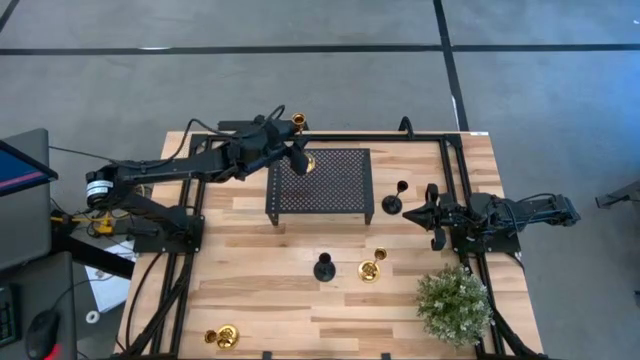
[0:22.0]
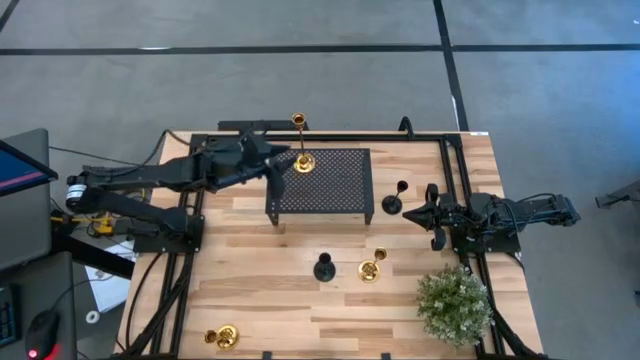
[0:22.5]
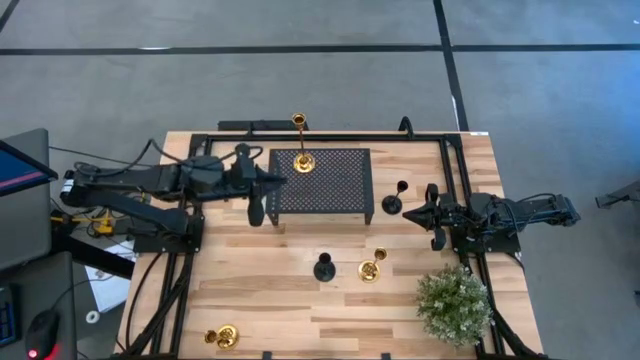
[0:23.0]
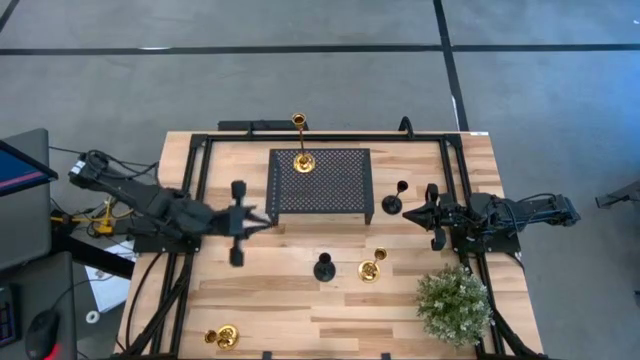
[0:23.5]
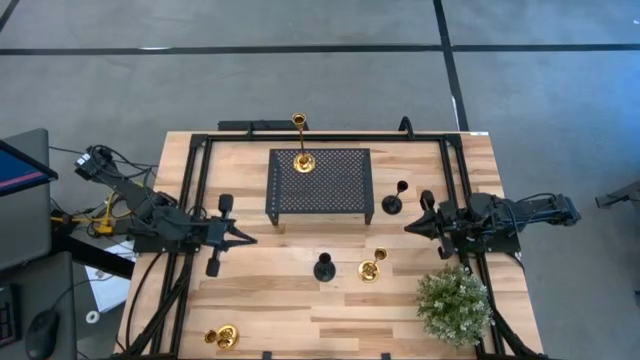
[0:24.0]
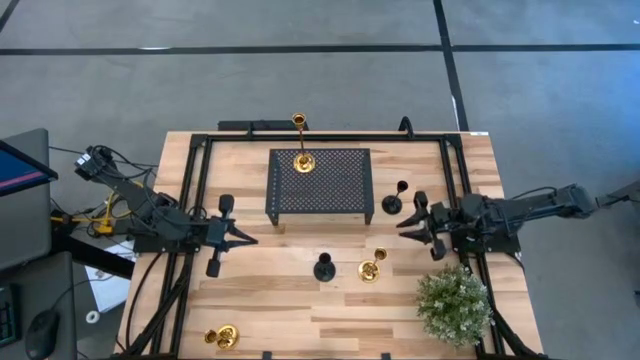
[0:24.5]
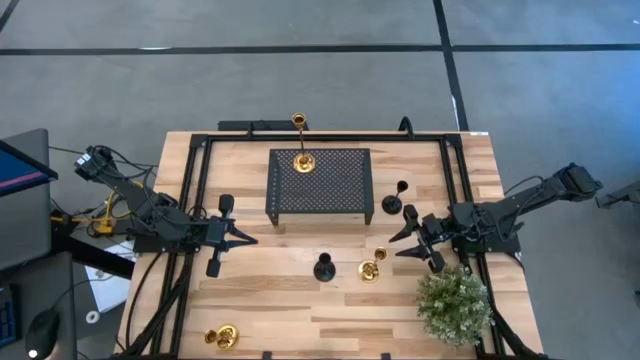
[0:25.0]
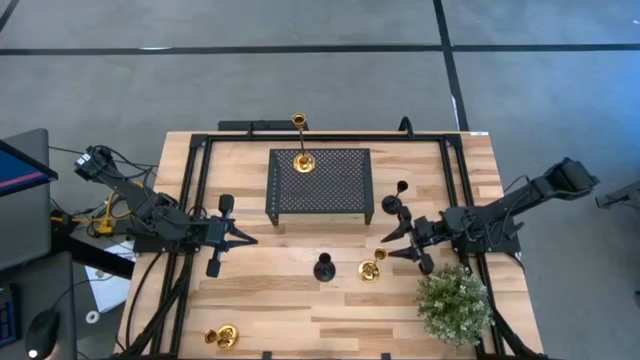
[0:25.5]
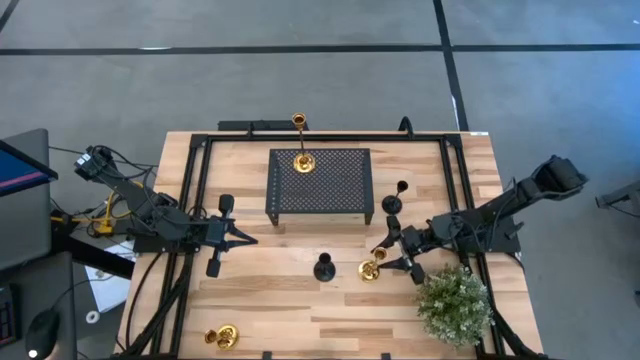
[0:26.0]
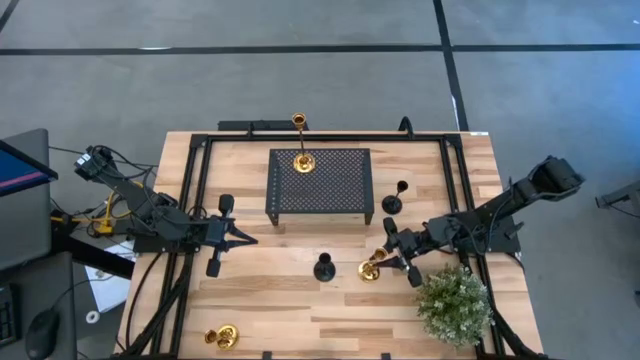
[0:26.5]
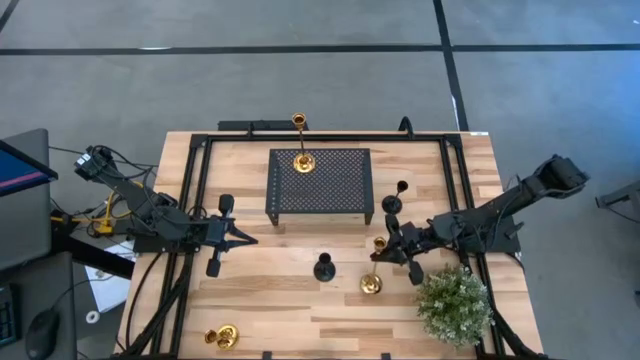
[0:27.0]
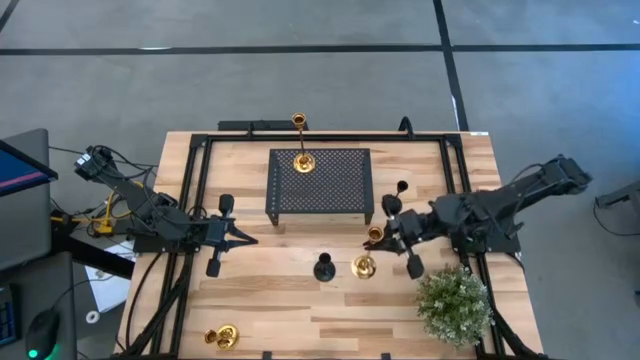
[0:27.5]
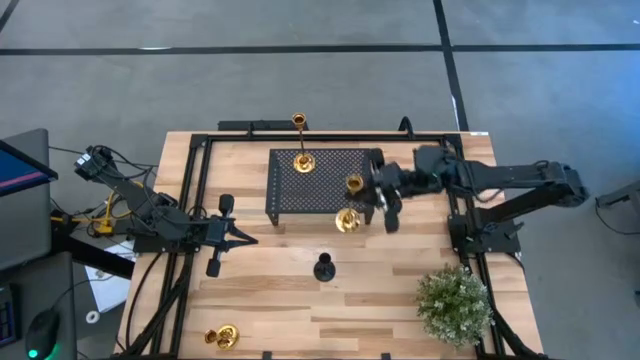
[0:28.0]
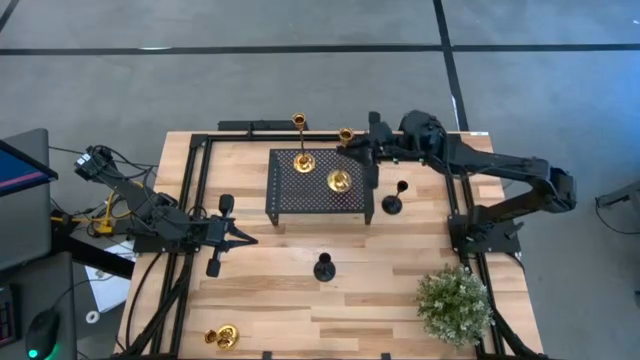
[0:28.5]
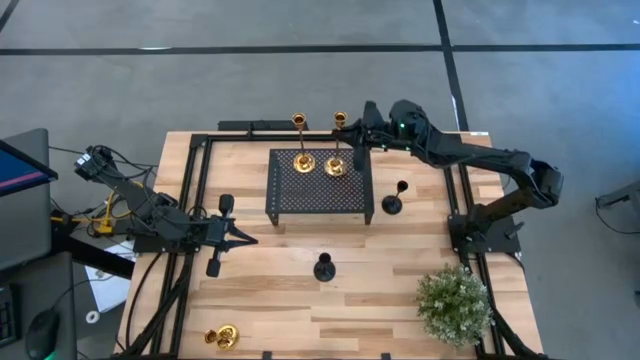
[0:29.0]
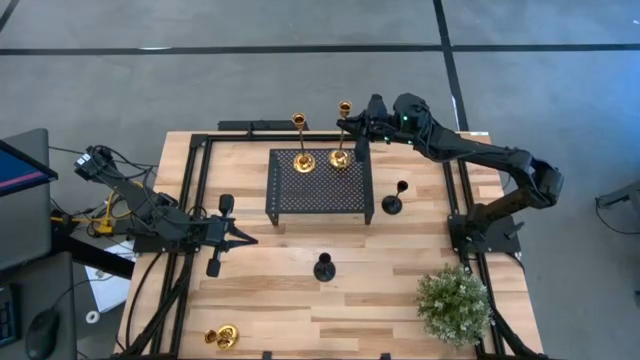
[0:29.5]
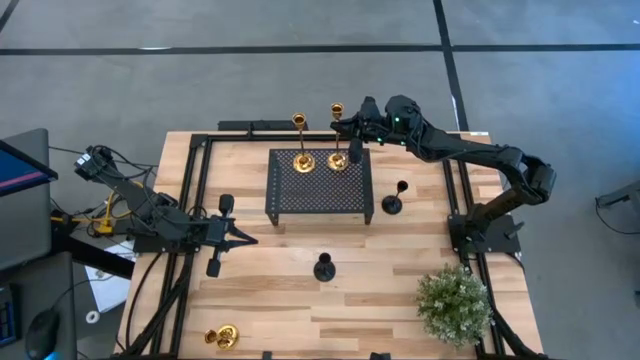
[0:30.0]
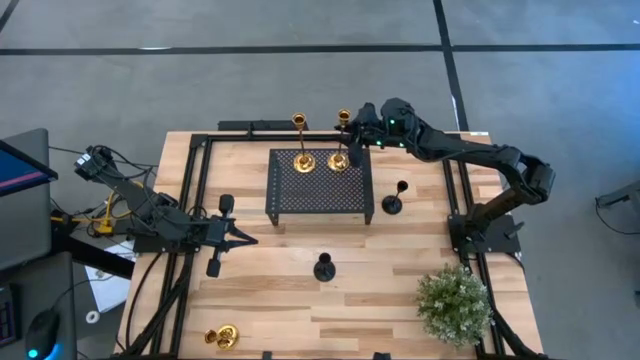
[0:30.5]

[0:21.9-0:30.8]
Task: Pick & Place candle stick holders
Put the top metal candle holder on the shelf

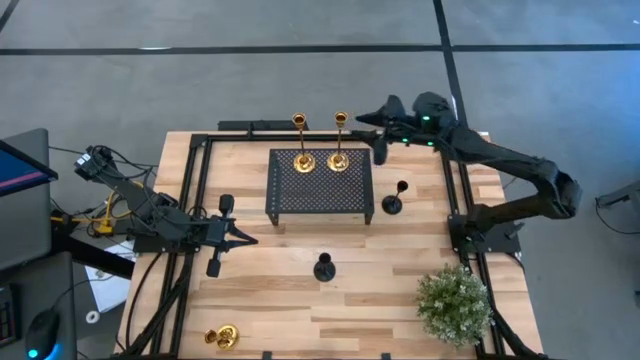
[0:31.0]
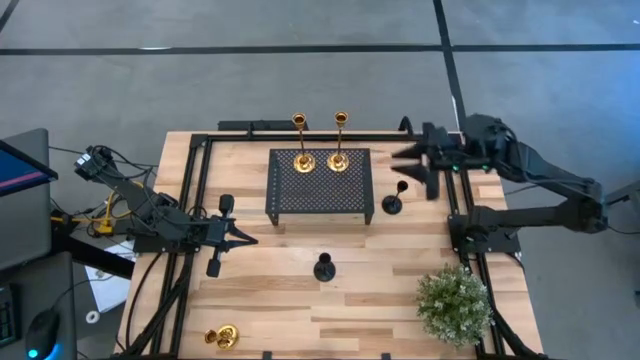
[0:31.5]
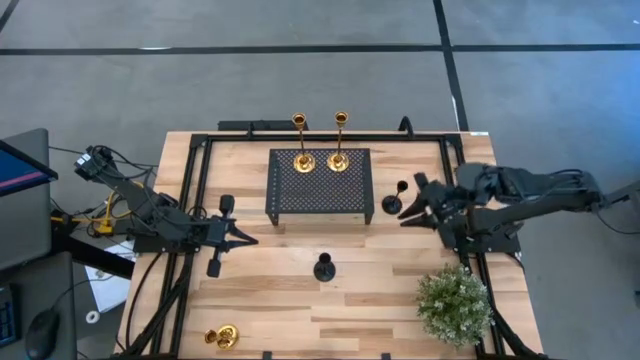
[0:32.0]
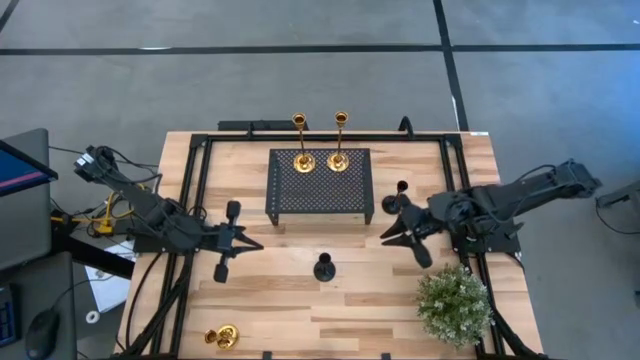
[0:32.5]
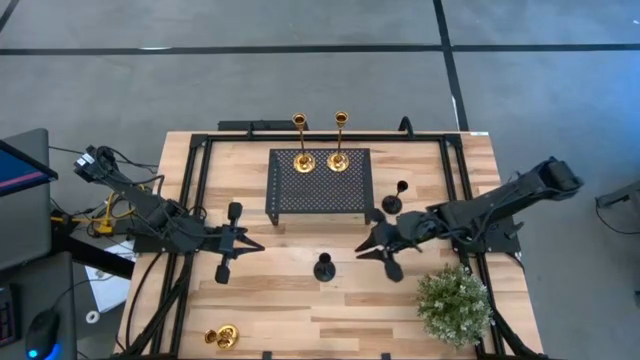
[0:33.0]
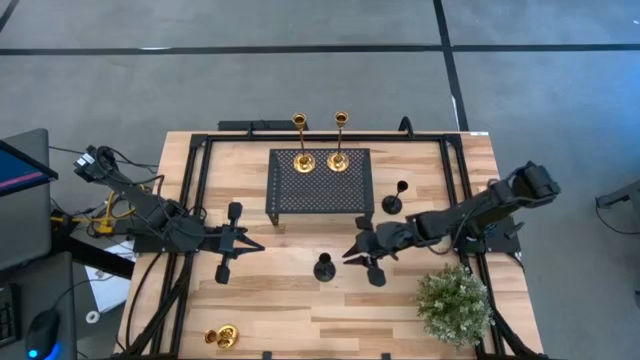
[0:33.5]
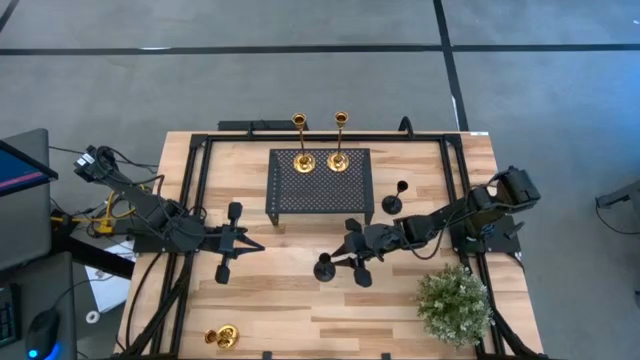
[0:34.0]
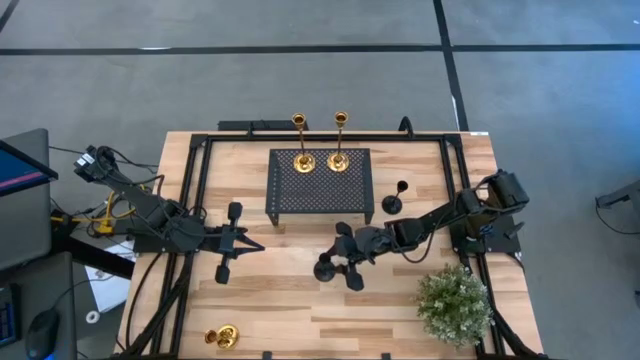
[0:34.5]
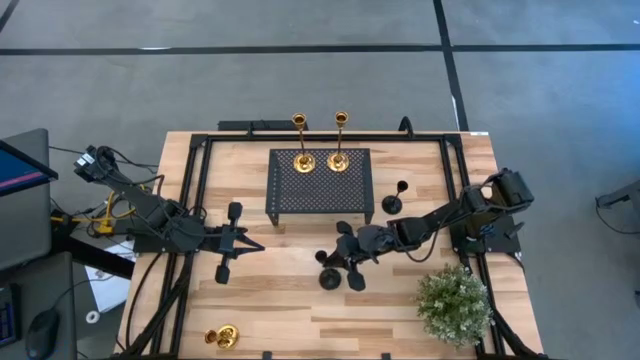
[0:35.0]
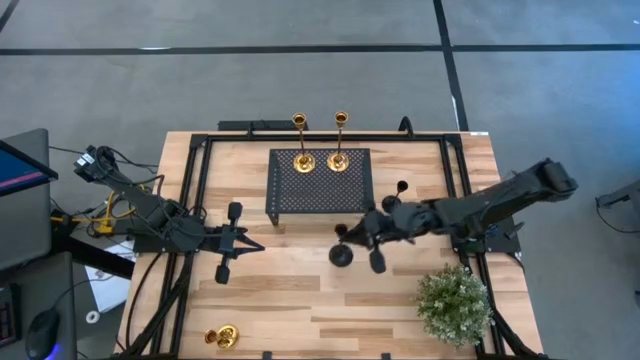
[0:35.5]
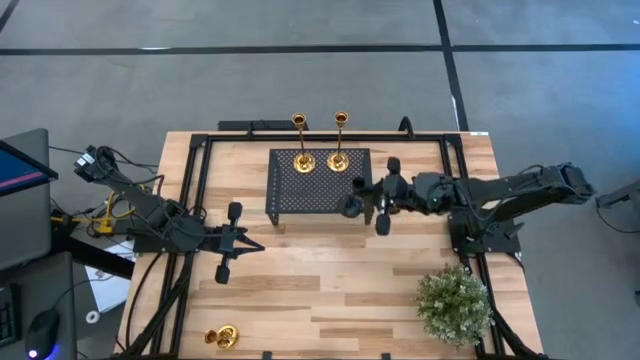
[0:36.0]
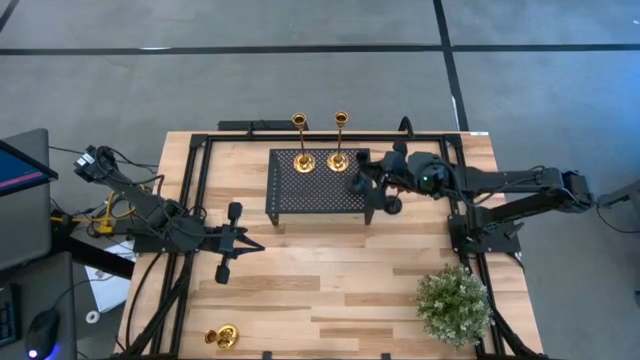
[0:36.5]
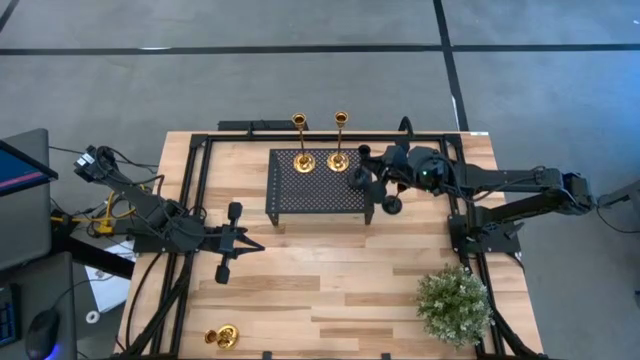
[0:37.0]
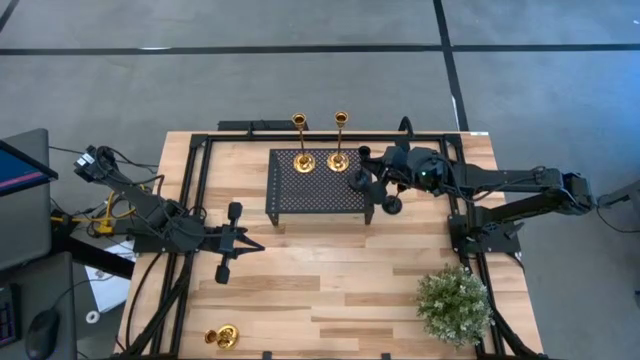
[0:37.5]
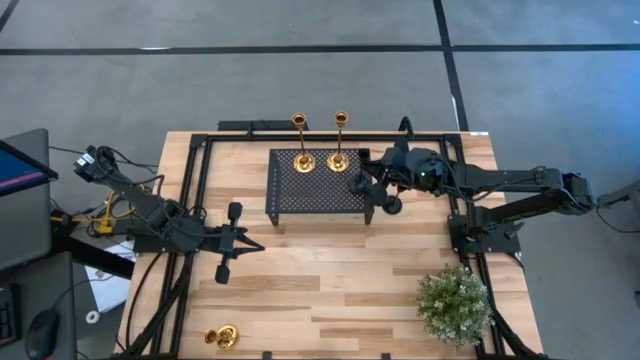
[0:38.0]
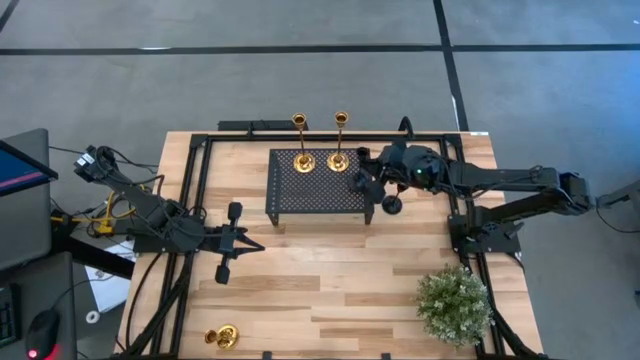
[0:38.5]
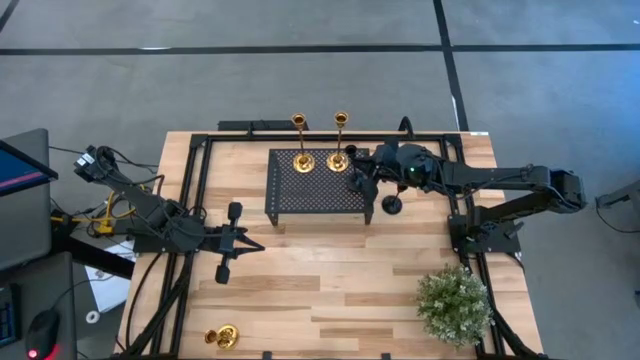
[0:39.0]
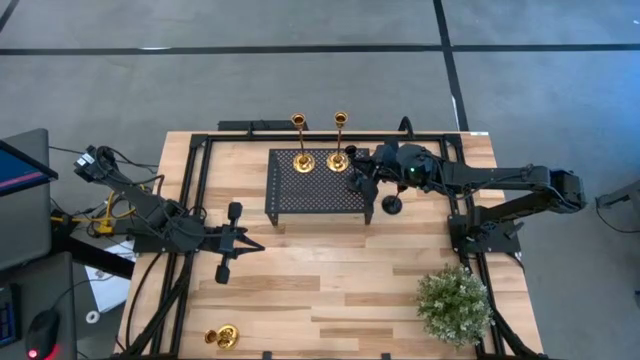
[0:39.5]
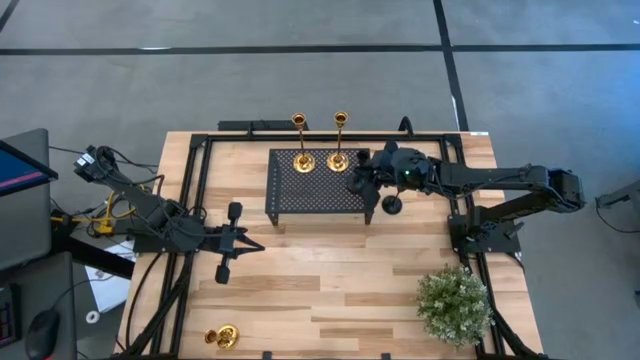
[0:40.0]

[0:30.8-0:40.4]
Put the bottom black candle holder on the shelf

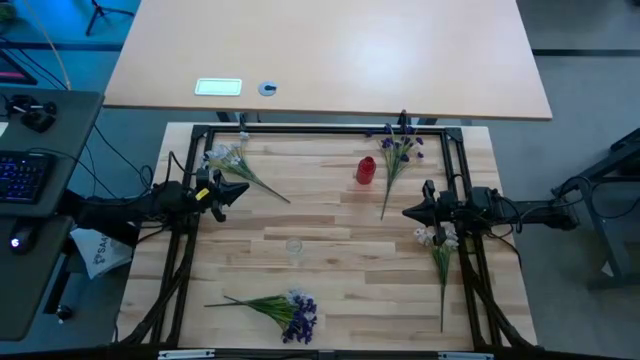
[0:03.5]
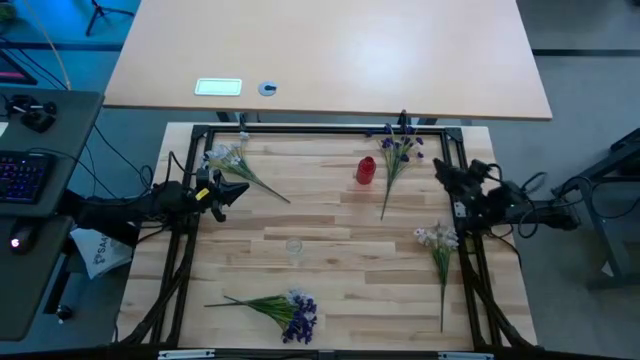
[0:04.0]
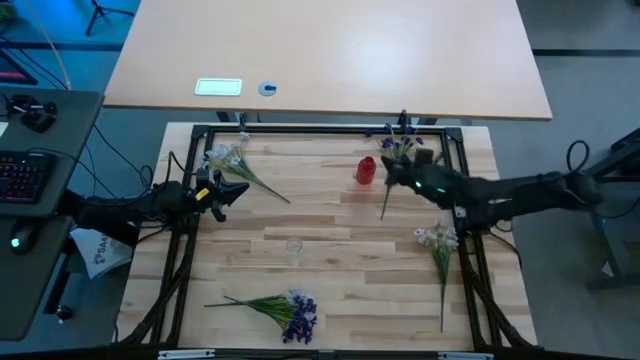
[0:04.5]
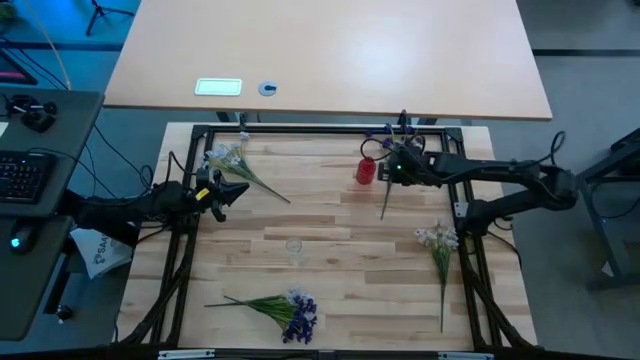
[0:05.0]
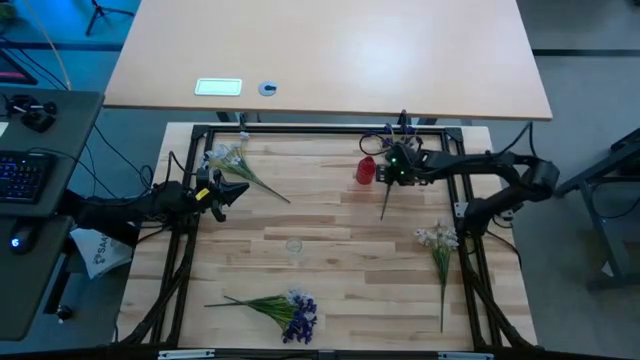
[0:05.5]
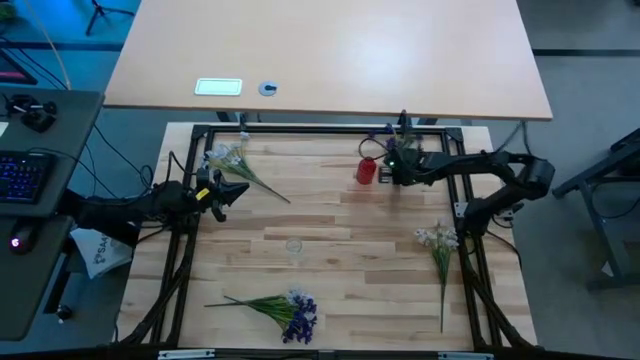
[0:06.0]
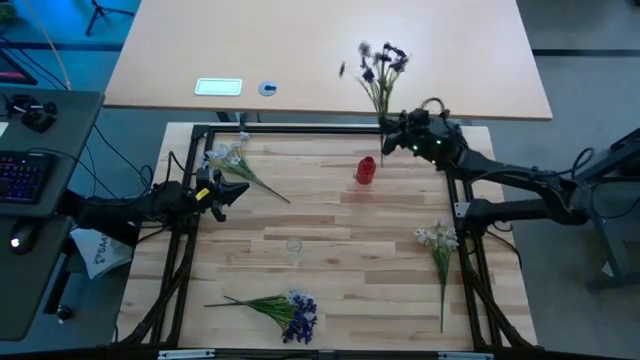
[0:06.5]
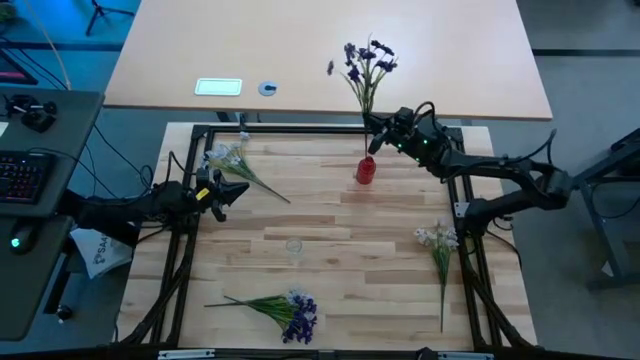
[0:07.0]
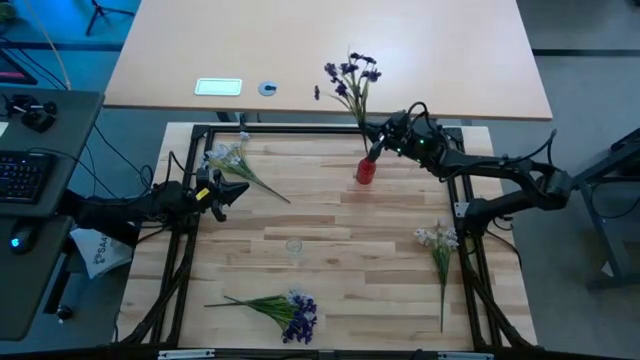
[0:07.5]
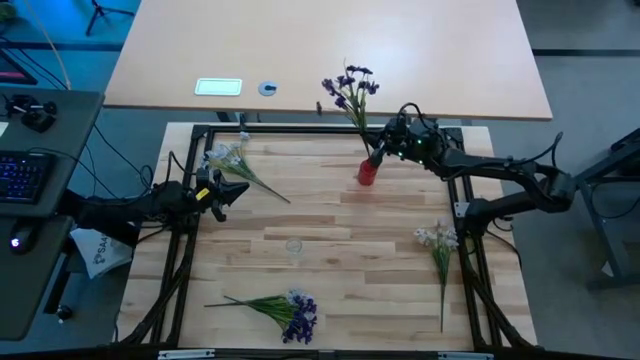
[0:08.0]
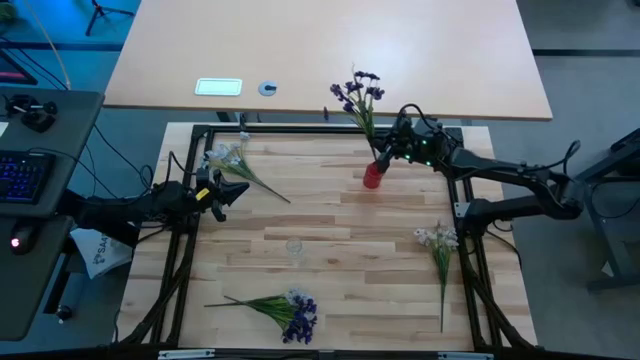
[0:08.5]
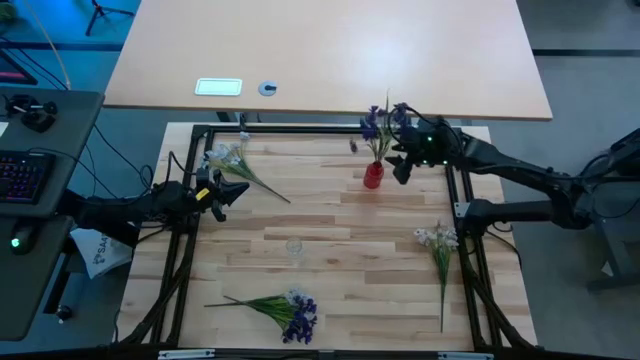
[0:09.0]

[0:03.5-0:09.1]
Task: Sort flowers into vase by color
Put the top blue flowers into the red crystal vase
